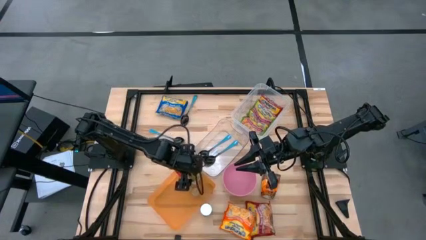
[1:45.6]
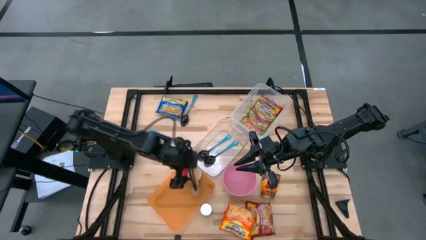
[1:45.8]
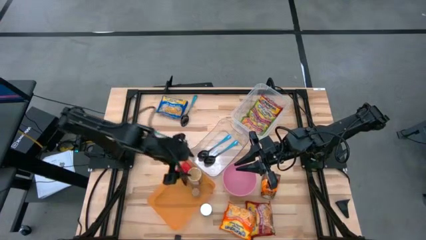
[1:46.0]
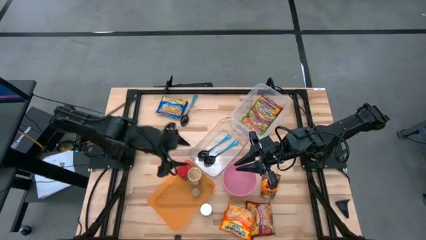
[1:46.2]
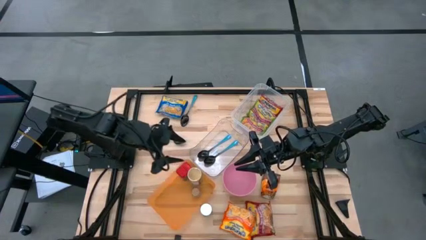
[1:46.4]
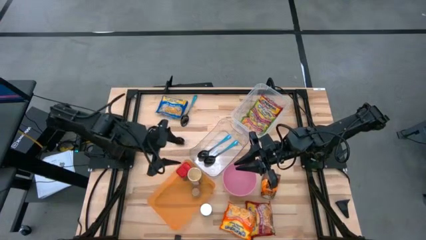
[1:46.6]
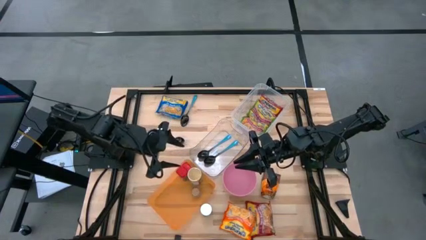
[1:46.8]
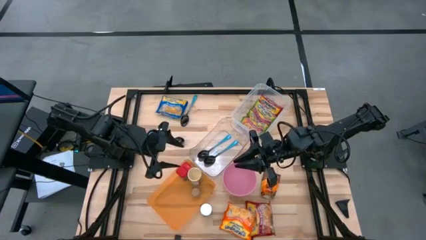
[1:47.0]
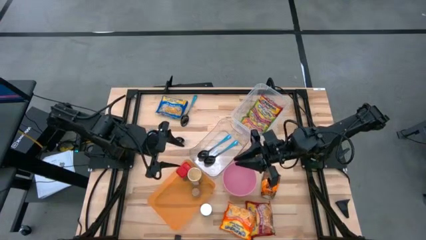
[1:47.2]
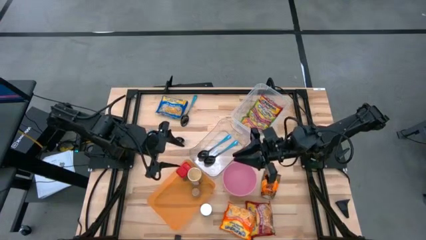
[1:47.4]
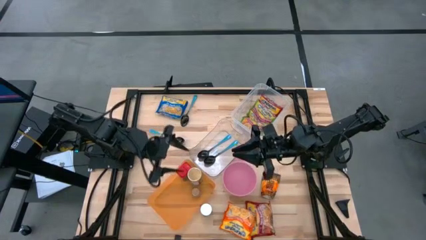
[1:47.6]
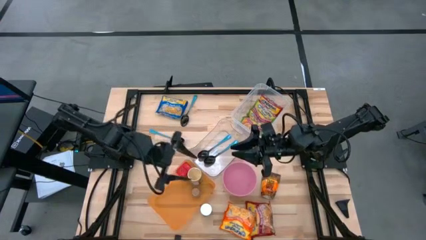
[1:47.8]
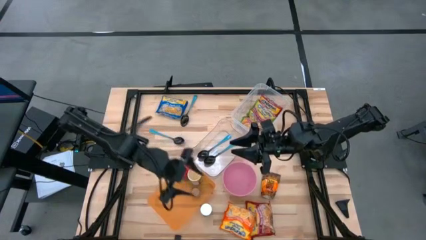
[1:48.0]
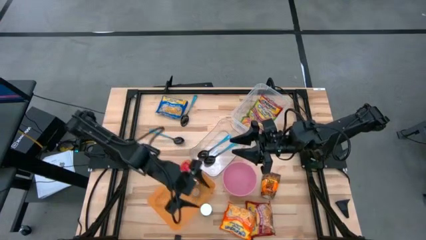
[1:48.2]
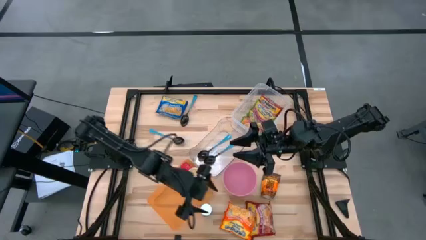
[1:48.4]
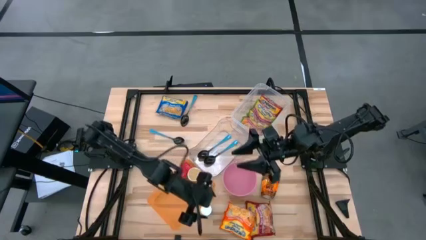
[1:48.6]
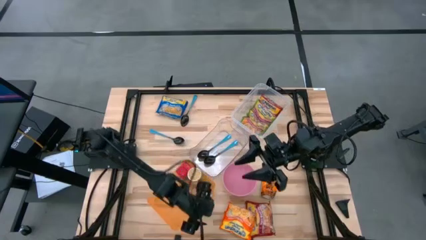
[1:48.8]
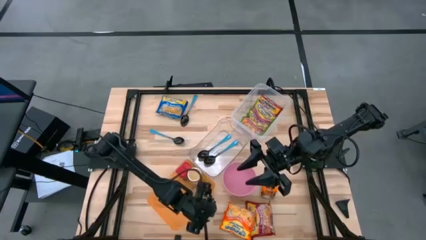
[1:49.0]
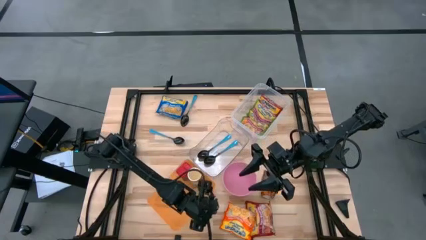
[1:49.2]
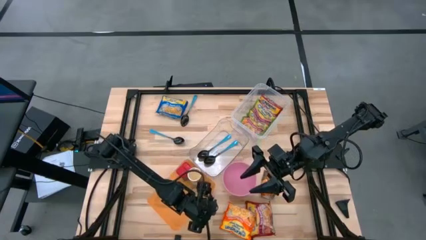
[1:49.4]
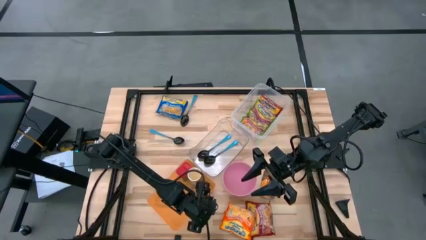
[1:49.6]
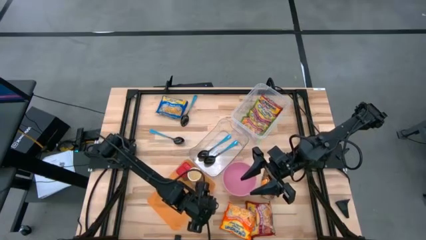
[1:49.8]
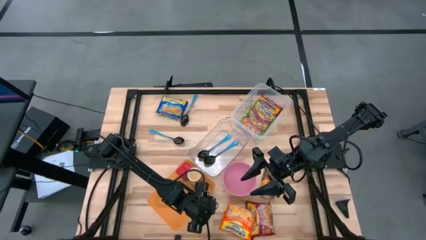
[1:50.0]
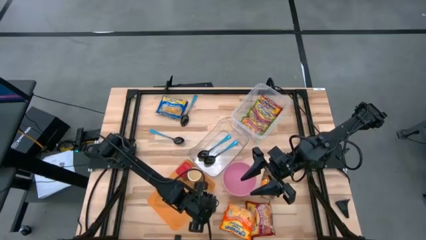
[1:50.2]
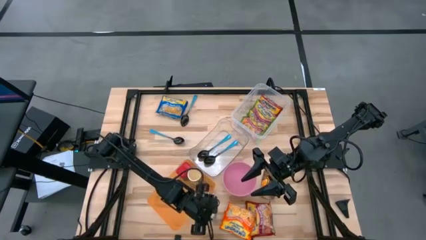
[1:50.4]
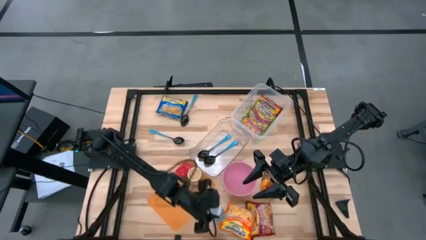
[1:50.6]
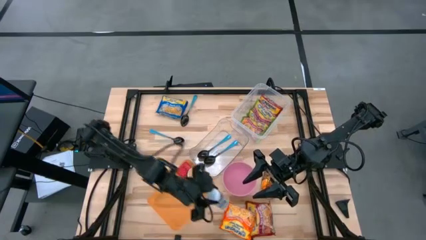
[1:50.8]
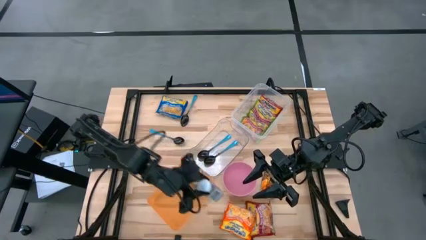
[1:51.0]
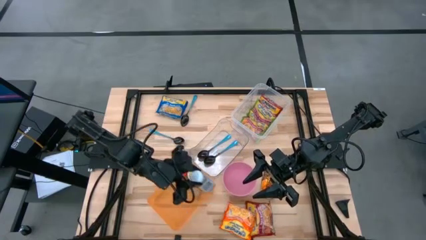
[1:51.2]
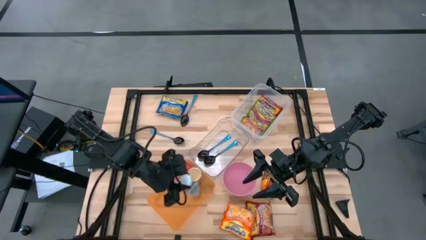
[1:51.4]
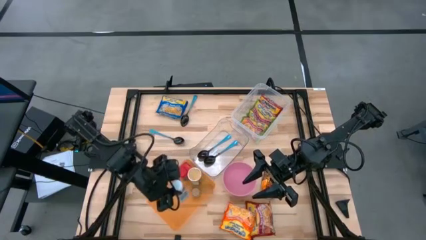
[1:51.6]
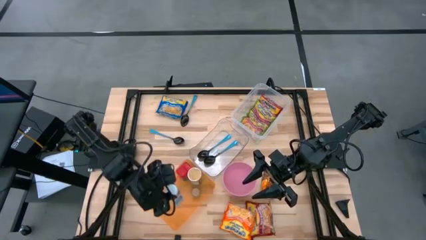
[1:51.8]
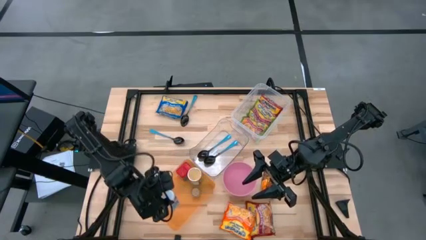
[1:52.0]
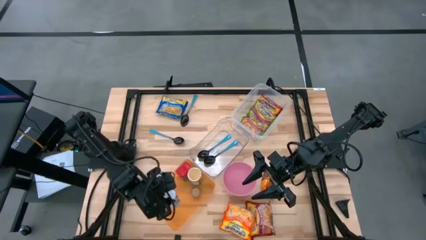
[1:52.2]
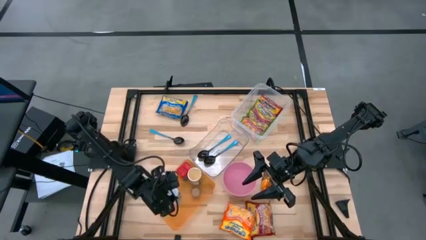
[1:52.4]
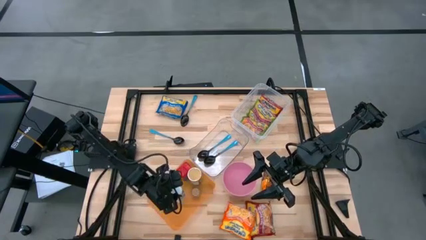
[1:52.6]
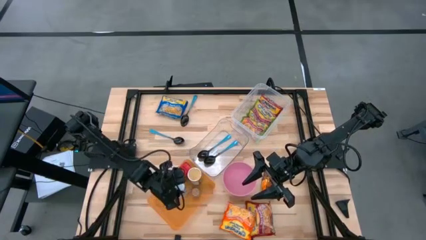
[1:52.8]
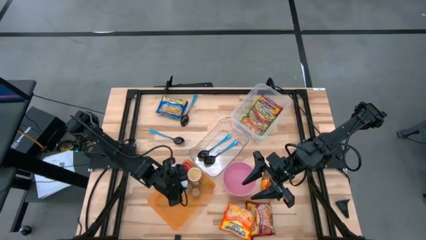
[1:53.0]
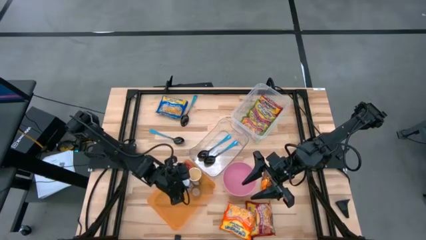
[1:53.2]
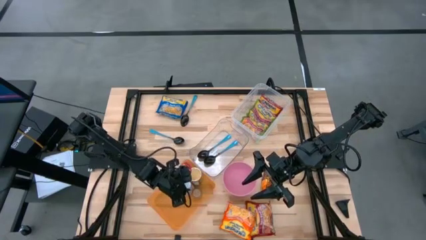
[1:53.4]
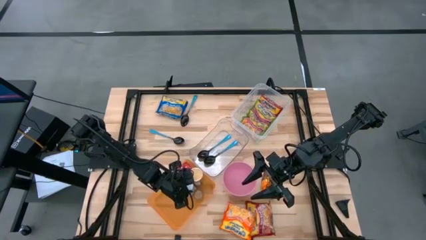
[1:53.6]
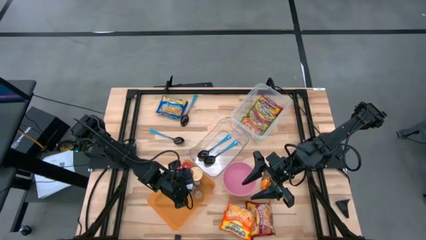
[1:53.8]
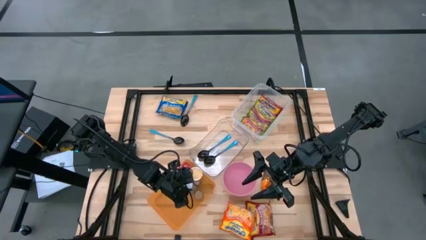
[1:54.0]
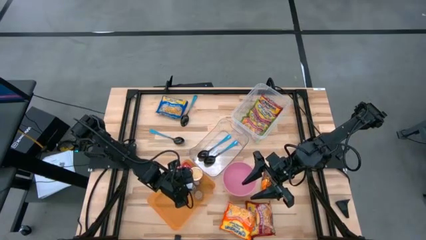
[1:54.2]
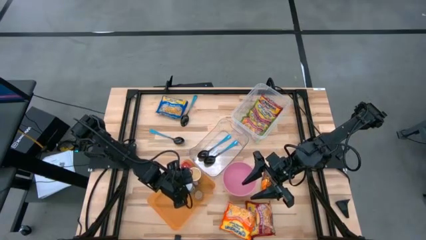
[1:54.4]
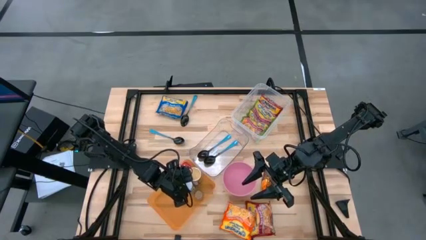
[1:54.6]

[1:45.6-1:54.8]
Task: Pick & Place Food Item
Put the white seasoning bottle into the orange bin

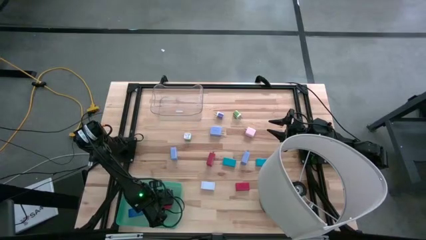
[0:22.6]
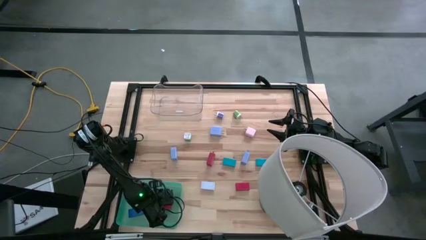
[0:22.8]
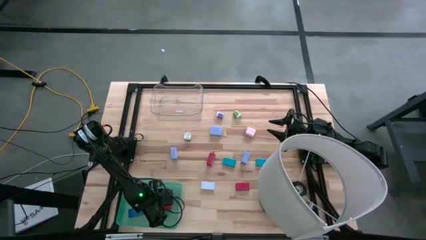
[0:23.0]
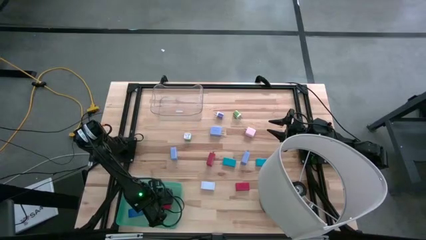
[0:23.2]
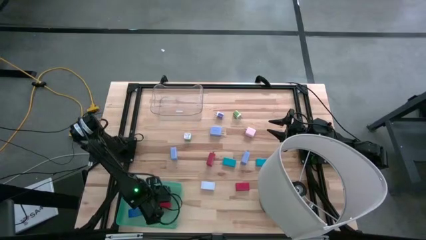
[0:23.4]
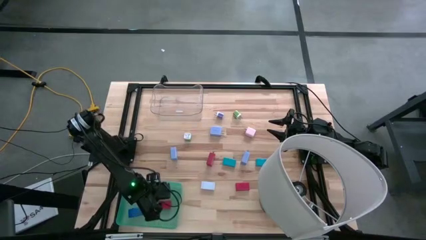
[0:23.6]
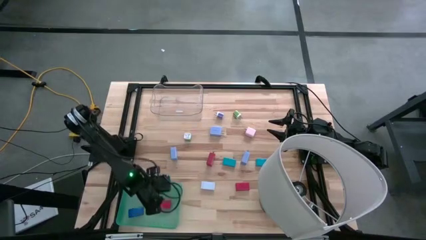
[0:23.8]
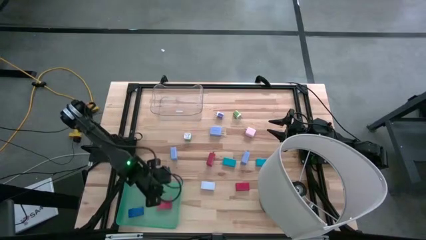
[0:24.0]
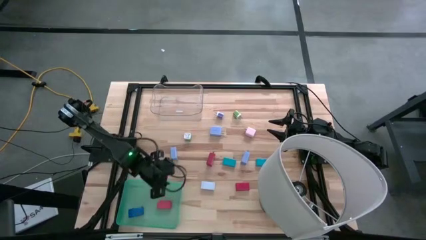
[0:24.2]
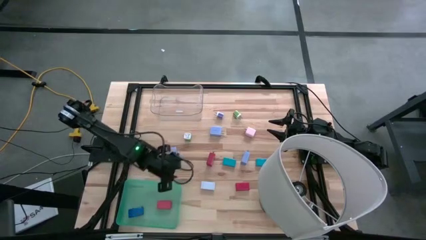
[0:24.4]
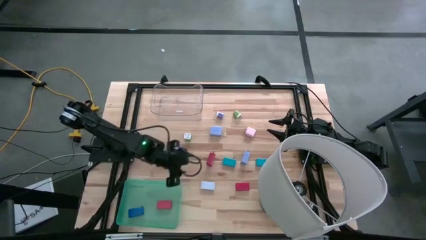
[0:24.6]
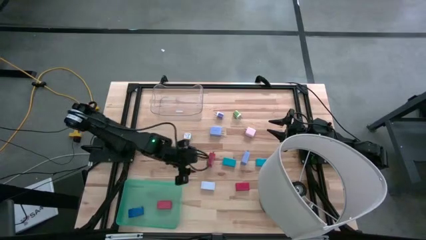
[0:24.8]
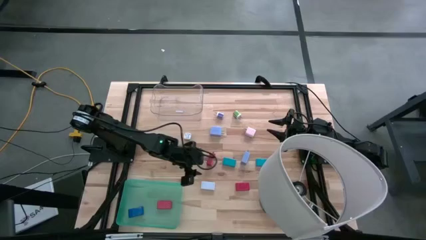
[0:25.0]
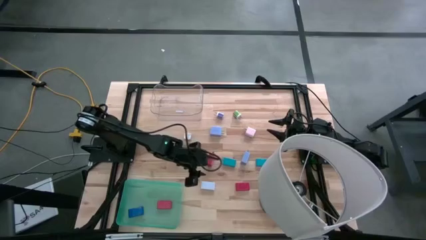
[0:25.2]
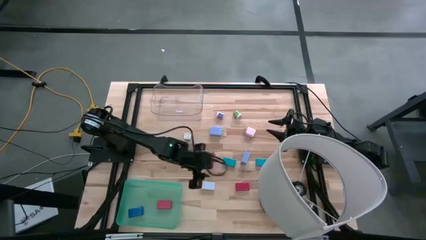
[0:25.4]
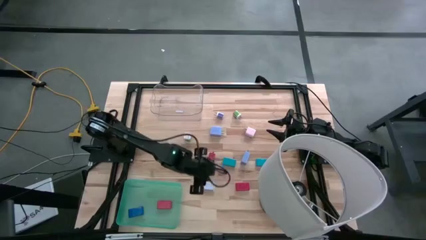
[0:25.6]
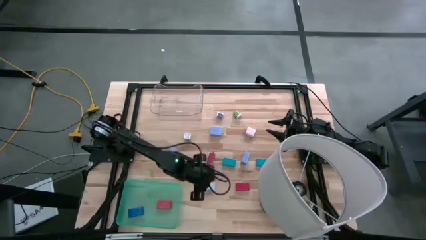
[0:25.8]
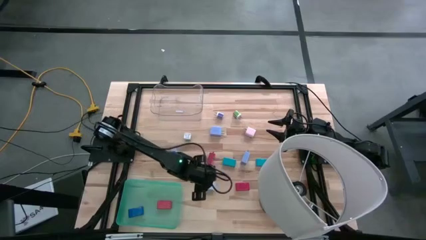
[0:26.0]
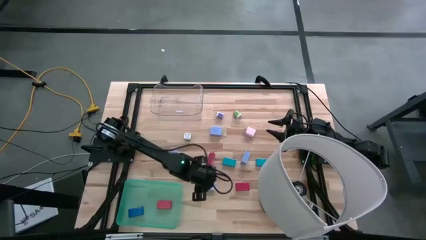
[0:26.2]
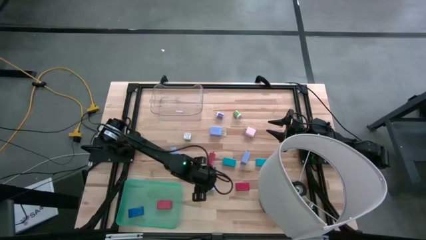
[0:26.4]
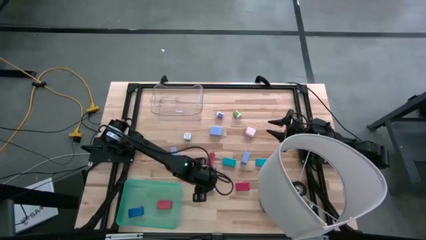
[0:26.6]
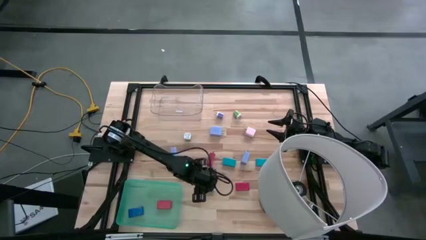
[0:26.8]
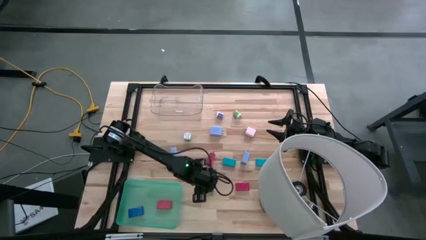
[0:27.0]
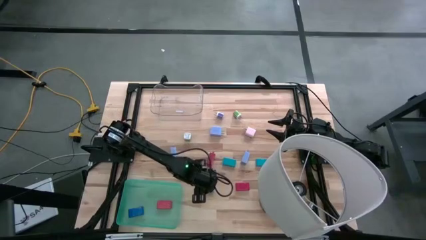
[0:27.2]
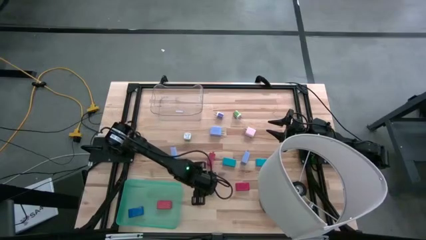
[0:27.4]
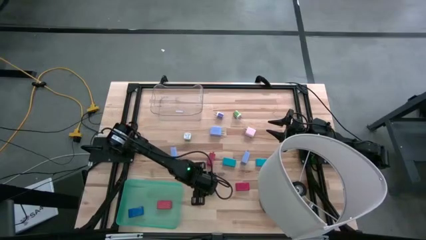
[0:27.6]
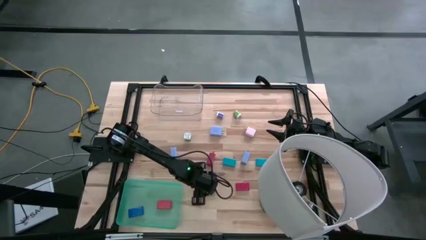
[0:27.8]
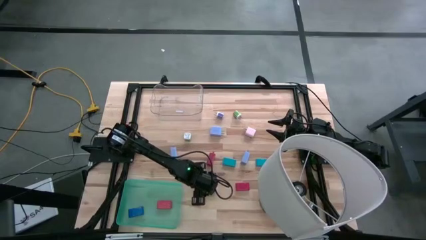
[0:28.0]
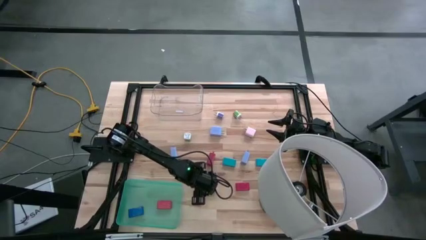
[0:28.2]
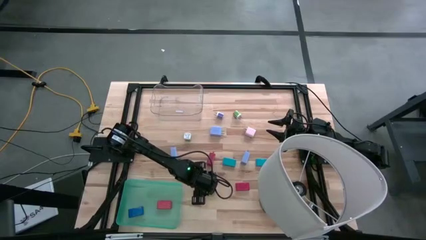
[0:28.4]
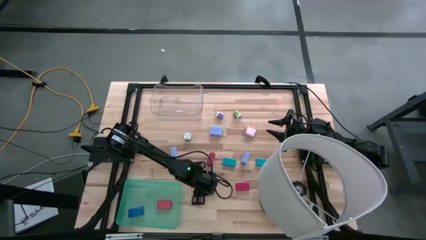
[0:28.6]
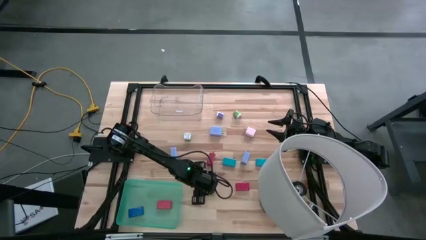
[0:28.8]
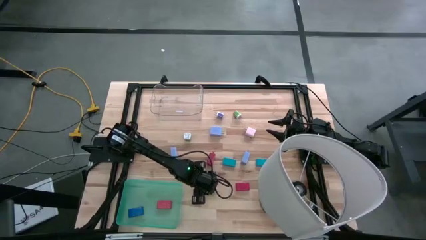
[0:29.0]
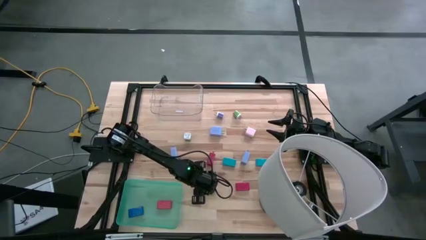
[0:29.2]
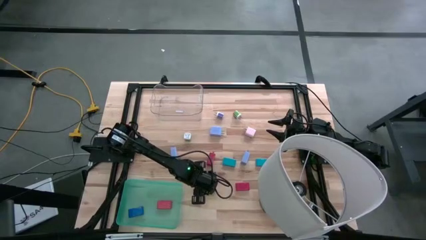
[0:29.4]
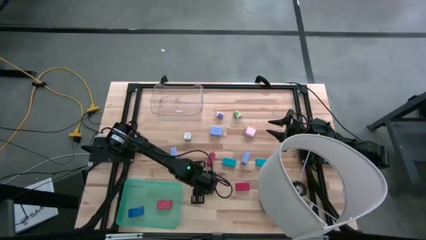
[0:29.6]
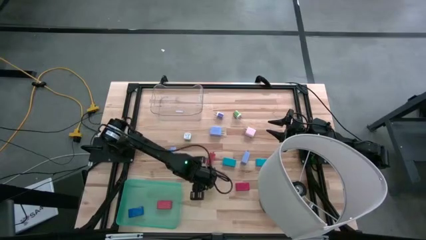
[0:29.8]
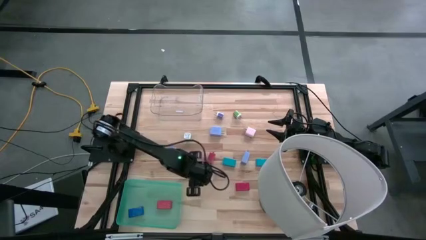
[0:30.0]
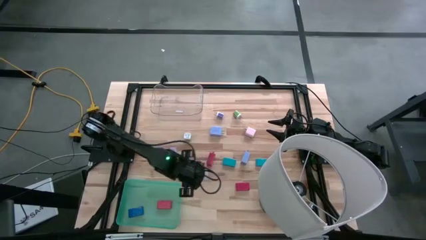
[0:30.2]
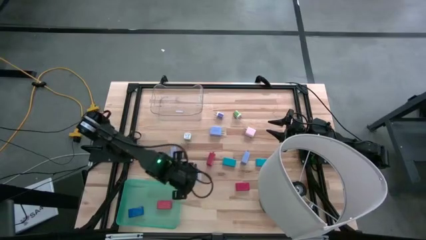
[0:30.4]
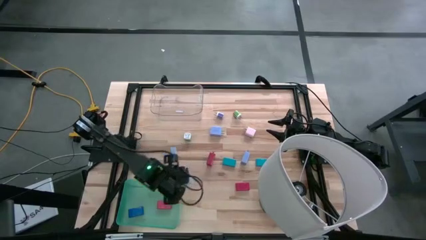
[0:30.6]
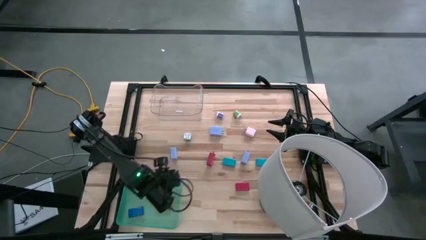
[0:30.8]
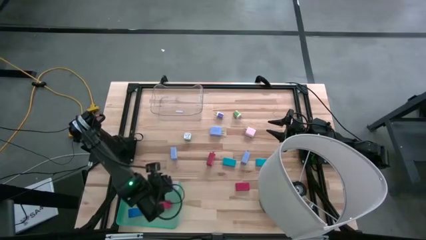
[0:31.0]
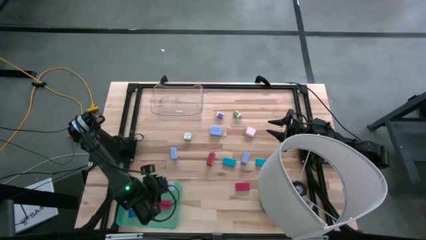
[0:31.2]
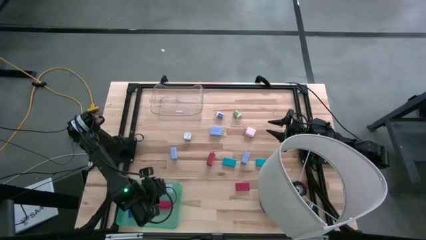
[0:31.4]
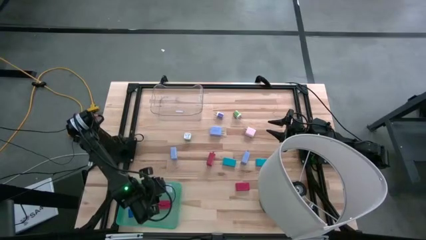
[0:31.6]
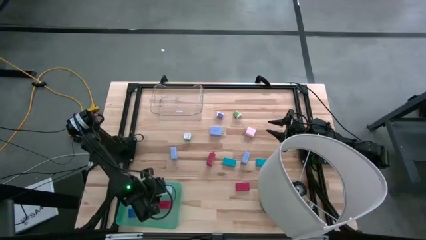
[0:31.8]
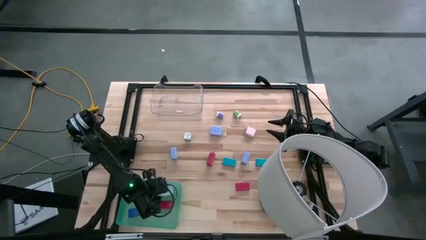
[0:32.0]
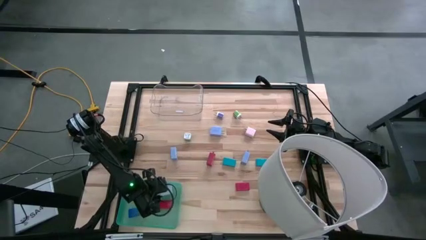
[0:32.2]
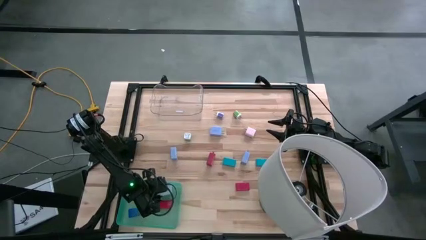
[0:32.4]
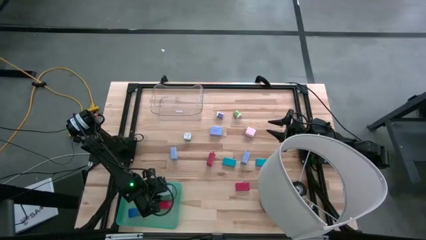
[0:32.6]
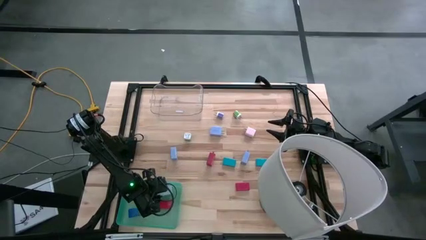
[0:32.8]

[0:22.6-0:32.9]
Task: Pick & Place Office items
Put the white digital clock into the green bin
